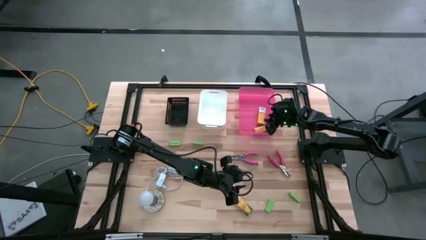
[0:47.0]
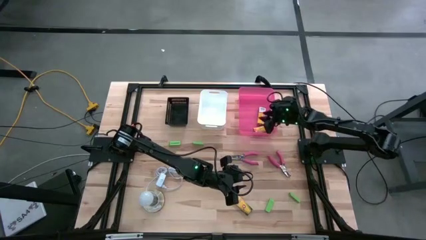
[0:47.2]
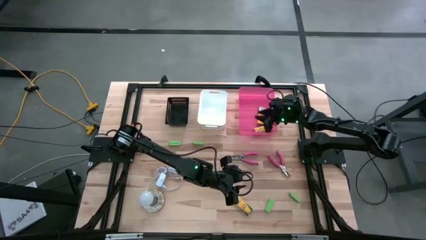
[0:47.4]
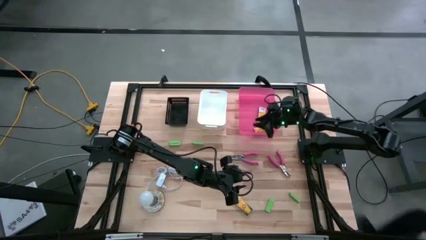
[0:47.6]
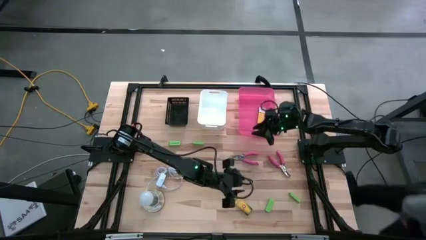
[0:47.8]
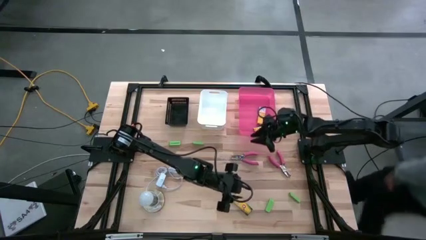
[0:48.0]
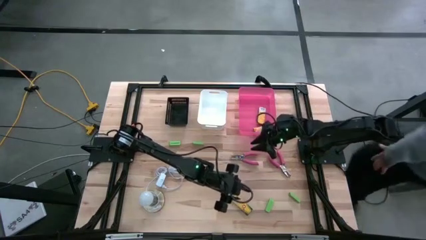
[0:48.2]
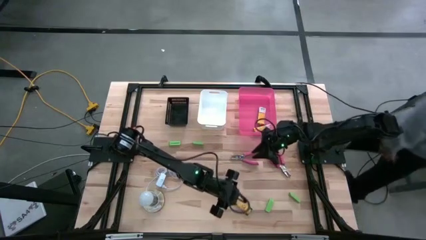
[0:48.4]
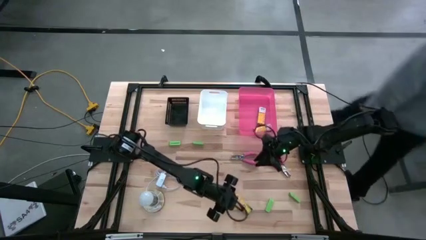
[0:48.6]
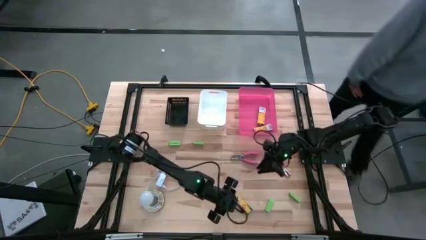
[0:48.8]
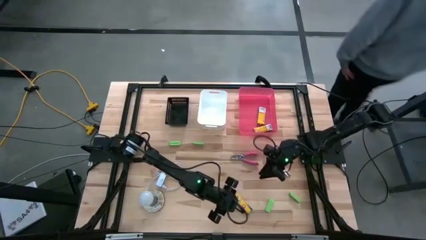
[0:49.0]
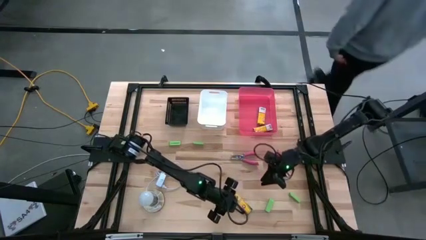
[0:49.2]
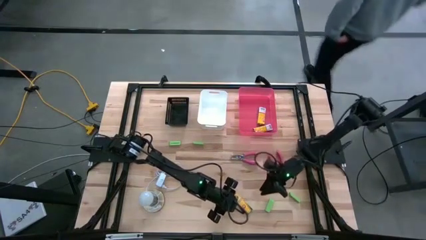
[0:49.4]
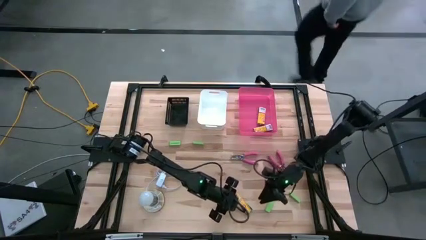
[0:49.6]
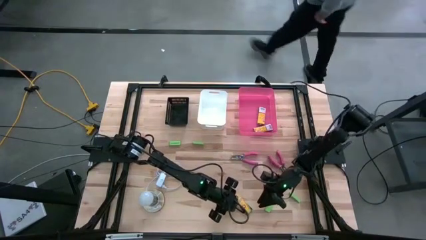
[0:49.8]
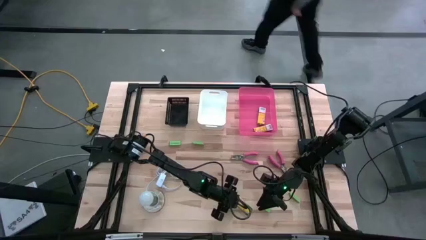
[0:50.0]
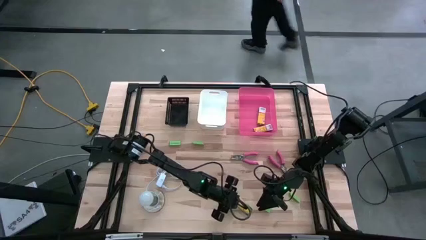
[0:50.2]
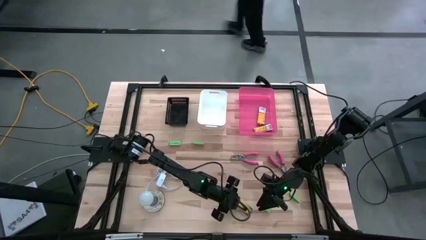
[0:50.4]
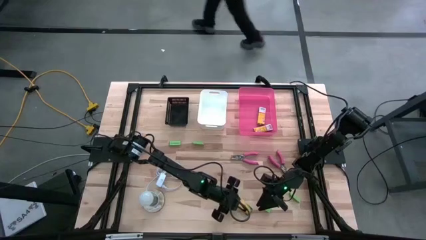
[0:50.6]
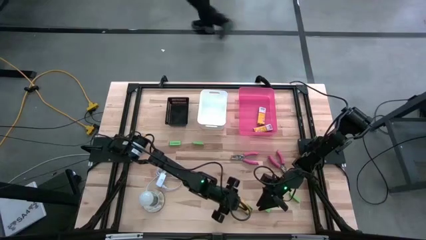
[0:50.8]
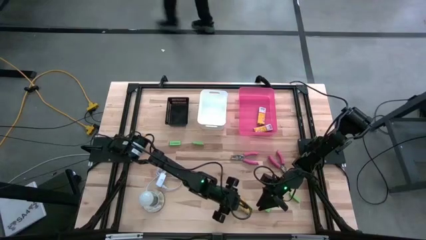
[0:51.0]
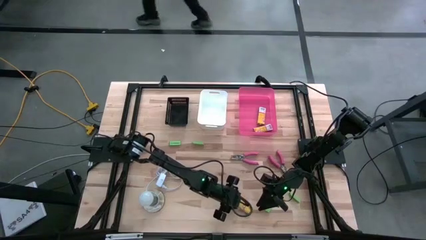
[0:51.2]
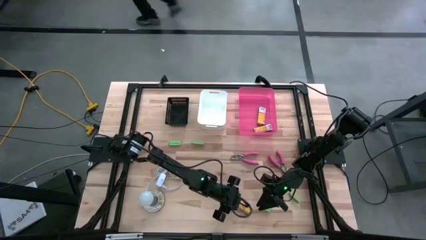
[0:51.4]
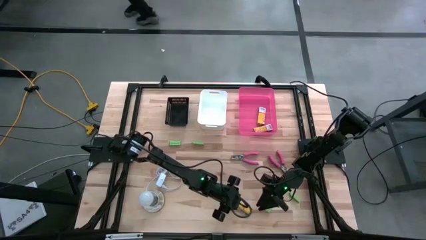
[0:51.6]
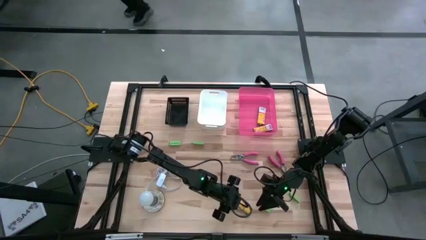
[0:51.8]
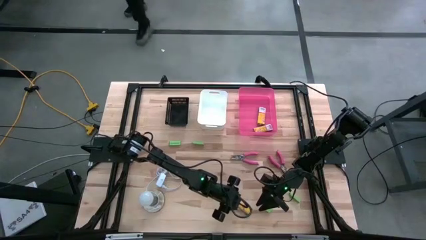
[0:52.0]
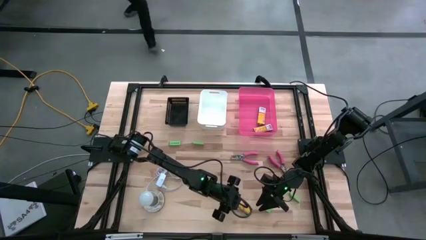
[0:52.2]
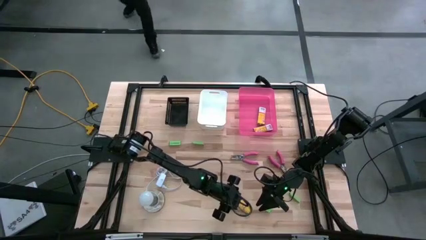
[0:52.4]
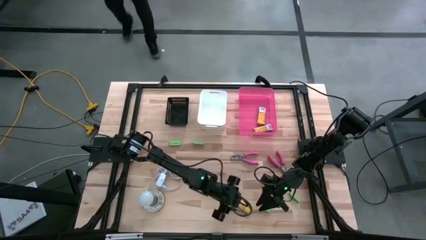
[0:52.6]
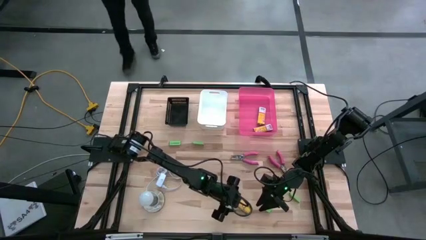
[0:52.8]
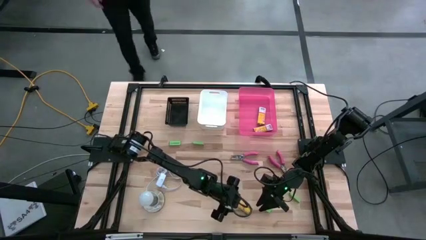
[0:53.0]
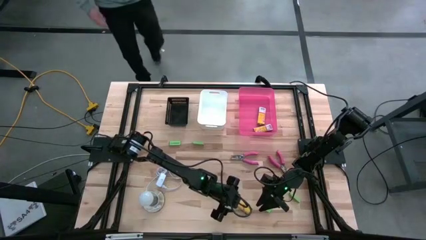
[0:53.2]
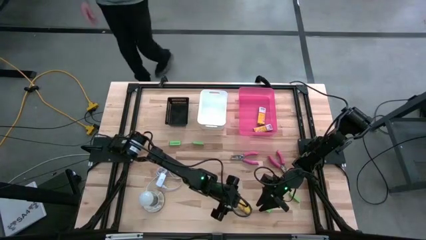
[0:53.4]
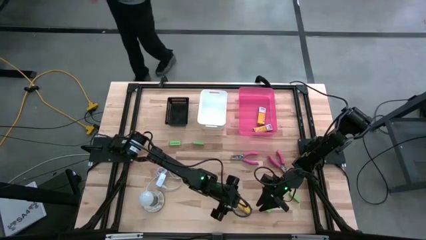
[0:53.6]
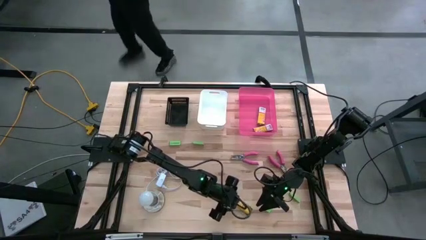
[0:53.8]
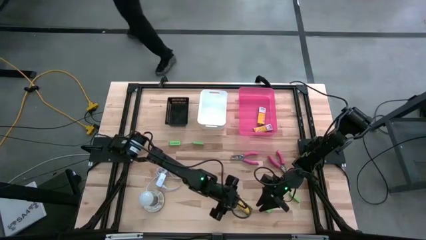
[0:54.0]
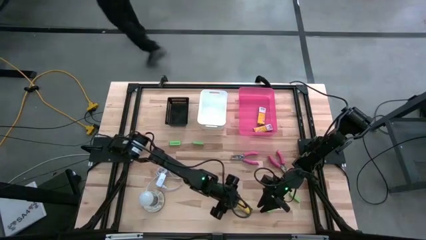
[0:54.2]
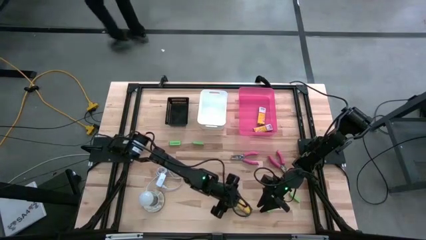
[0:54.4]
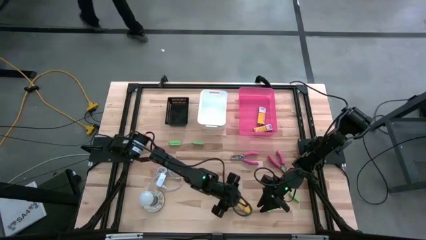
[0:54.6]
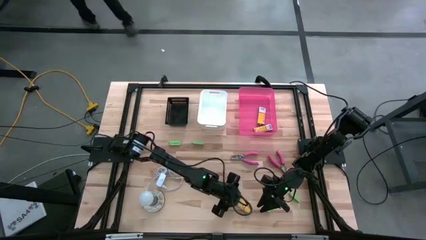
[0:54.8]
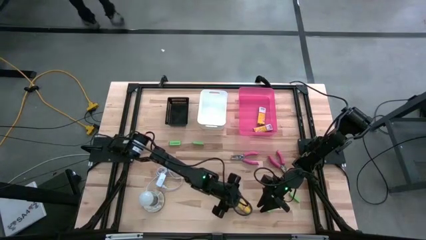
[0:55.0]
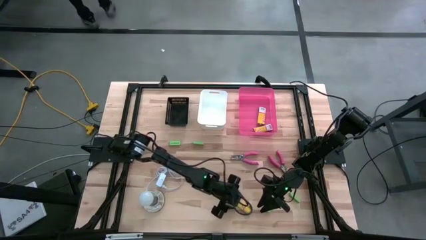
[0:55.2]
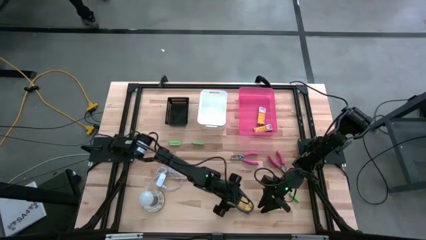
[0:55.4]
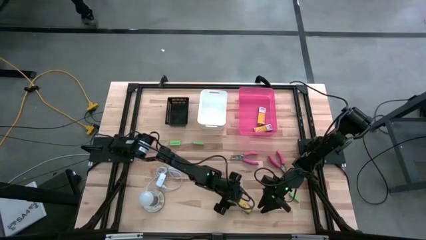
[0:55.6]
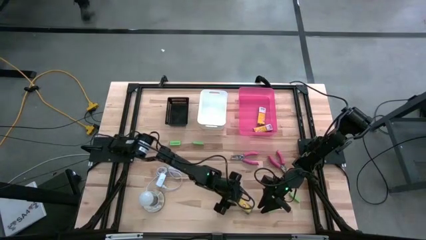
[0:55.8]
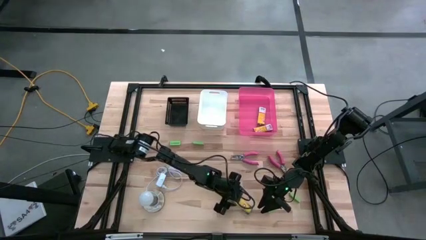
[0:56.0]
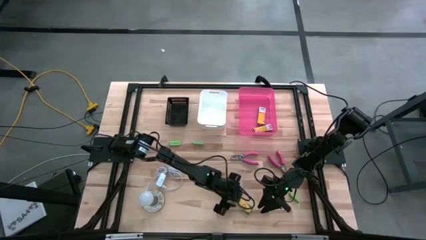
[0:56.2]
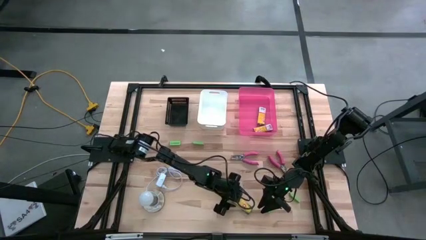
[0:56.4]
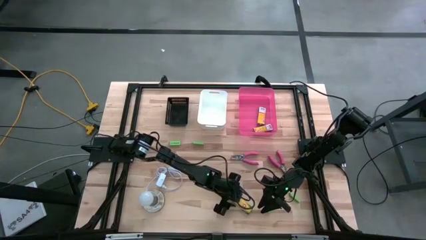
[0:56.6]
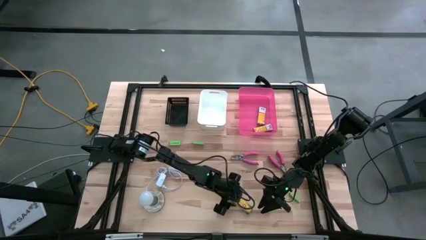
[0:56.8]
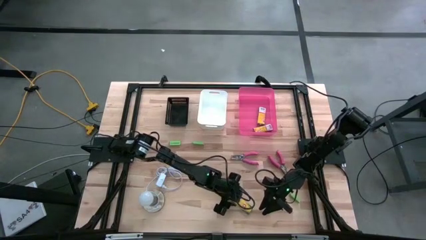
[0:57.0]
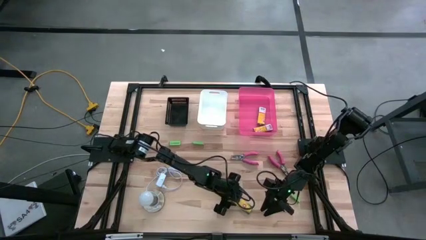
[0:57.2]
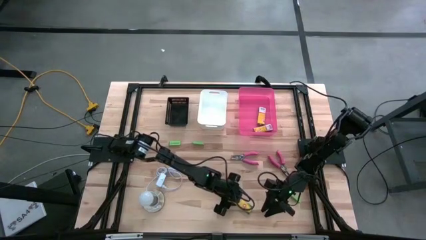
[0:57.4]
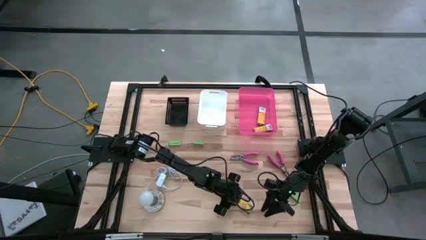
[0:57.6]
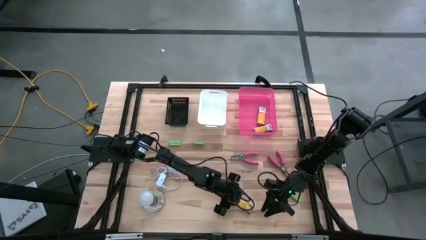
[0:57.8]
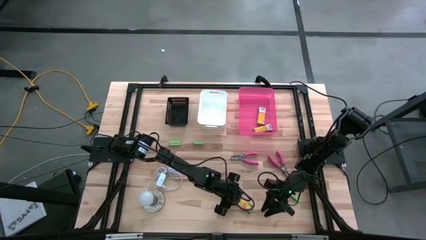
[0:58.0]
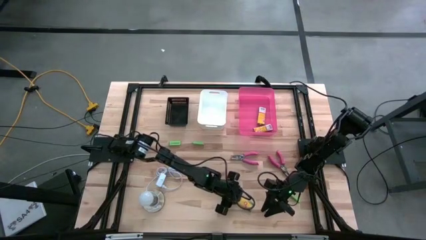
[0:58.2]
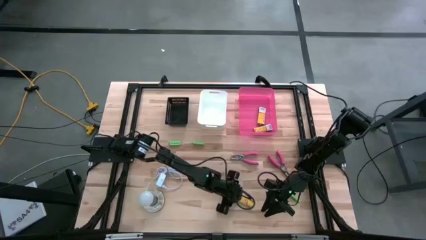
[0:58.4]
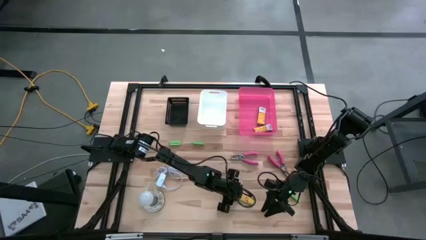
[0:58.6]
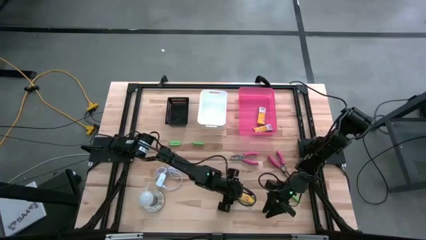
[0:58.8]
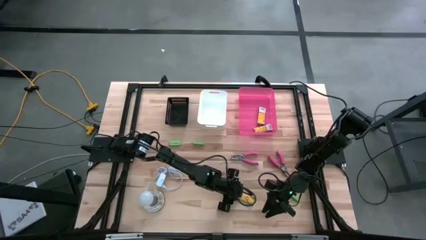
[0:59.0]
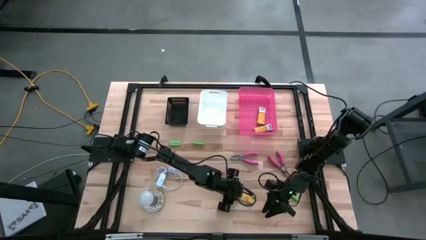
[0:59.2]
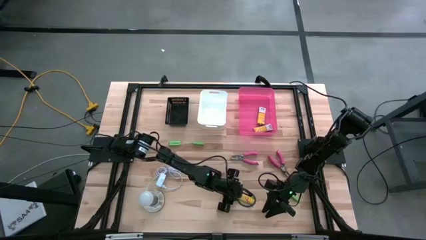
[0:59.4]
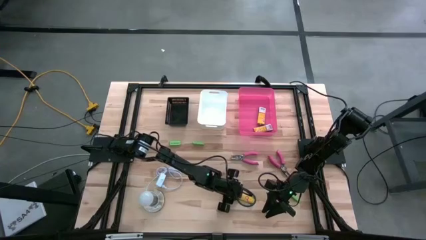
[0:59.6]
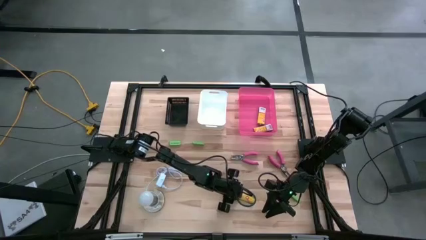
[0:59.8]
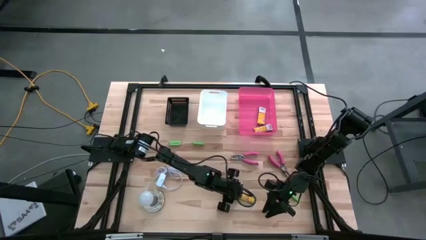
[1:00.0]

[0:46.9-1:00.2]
Task: Pick & Place School Supplies
Put the crayon box into the pink bin
